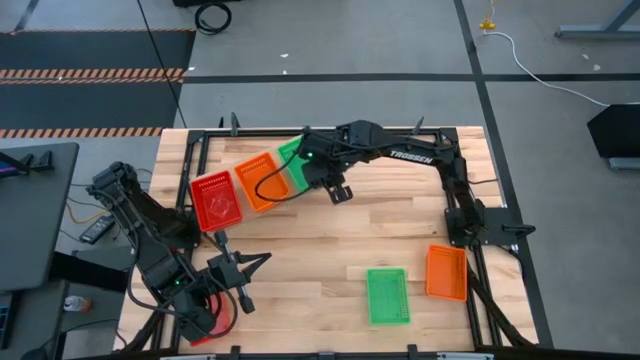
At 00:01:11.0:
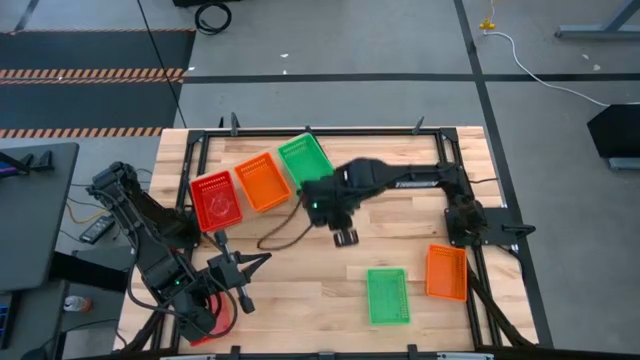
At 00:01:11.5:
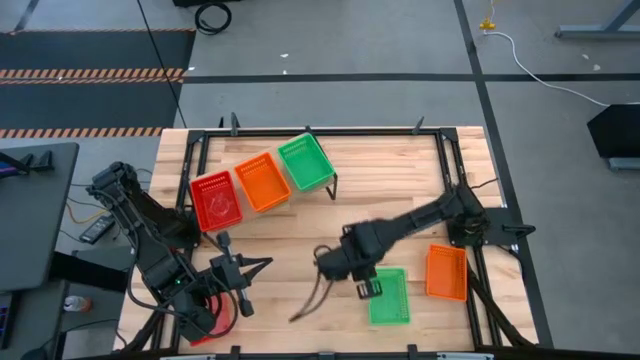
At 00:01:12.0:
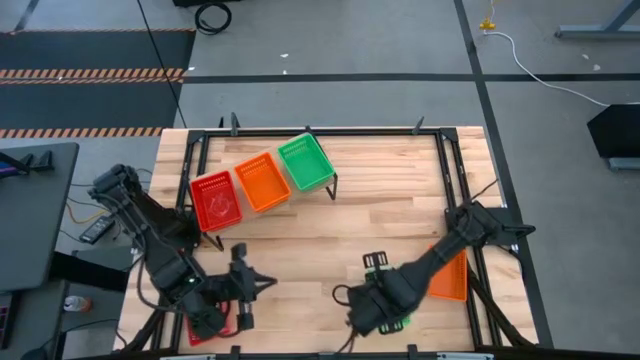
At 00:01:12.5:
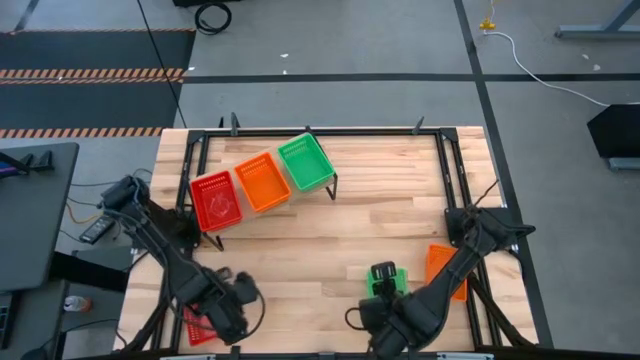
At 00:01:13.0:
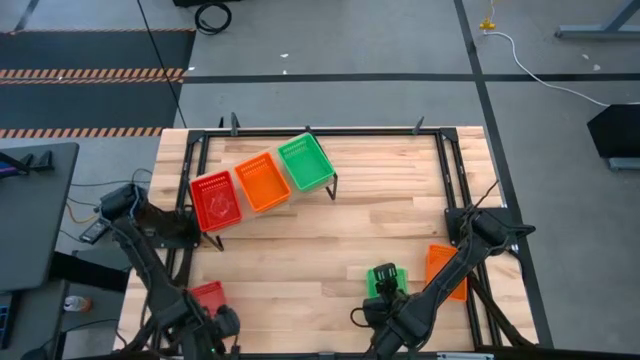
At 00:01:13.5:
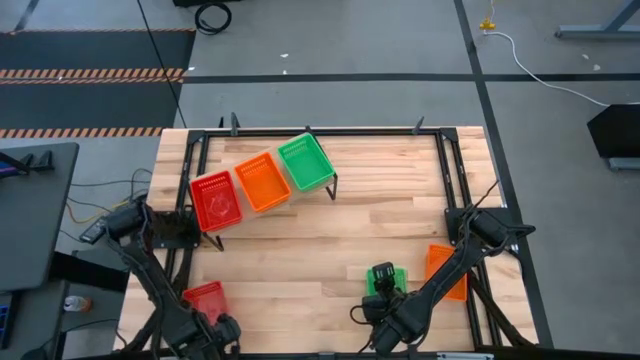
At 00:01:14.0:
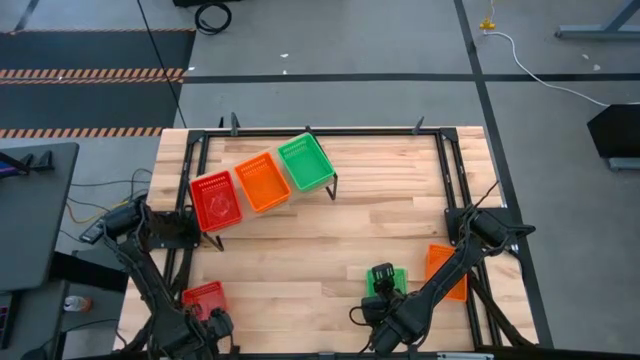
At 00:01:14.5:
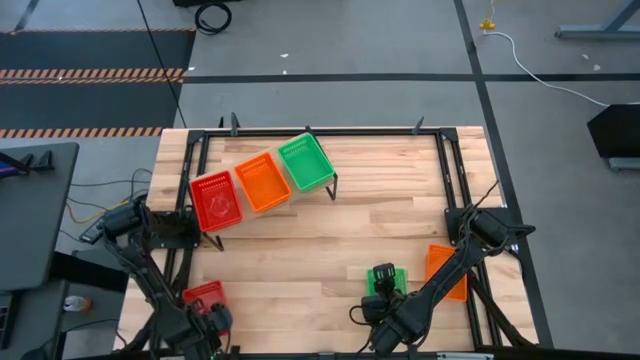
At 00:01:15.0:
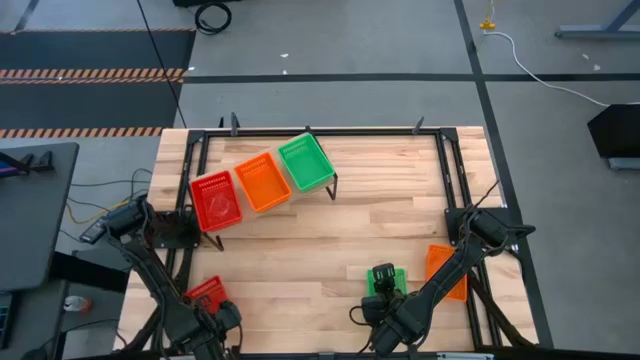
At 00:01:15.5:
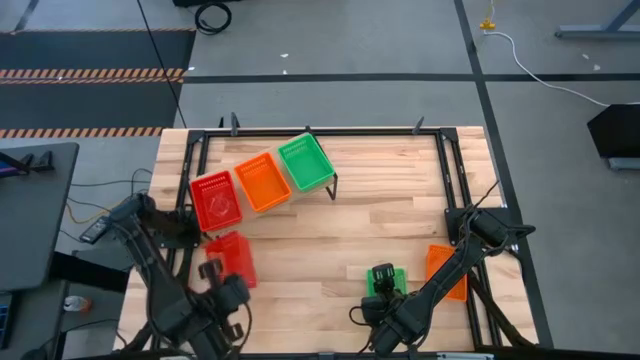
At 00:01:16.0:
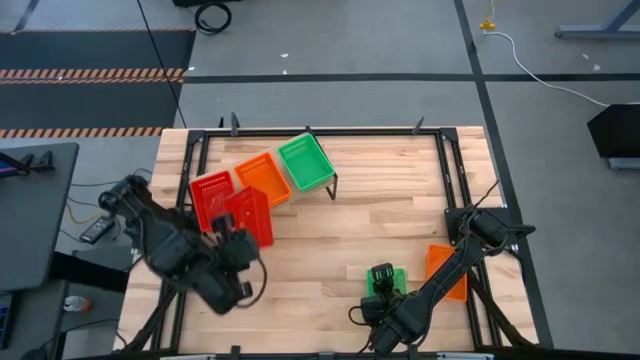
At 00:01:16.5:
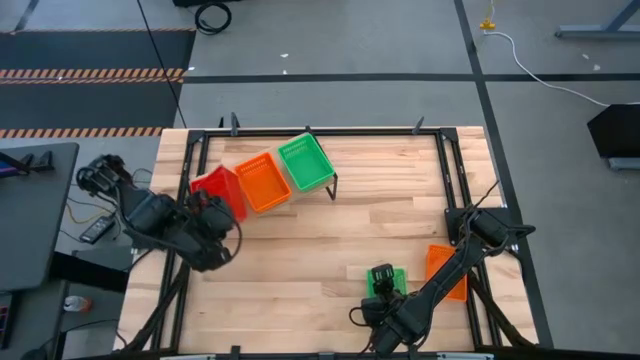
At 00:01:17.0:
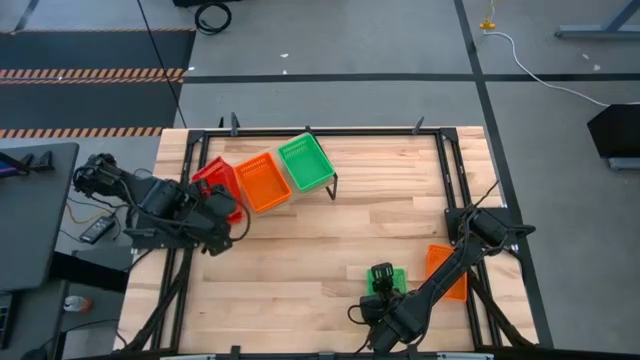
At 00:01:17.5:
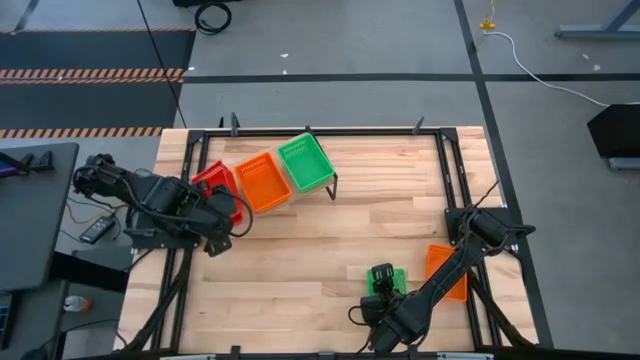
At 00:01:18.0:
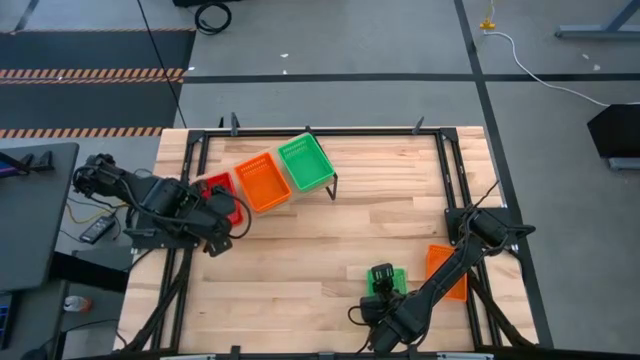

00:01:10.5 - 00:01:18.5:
Task: Stack baskets on shelf by color
Stack the red bin on the red bins on the shelf

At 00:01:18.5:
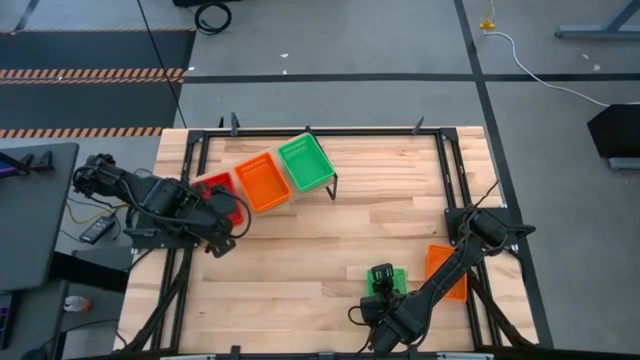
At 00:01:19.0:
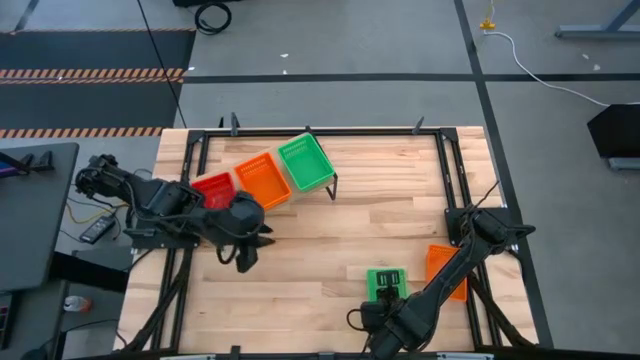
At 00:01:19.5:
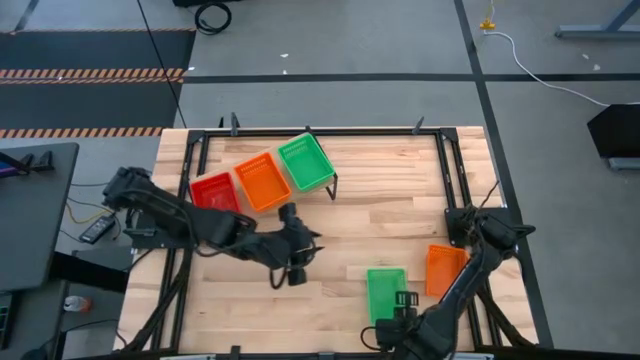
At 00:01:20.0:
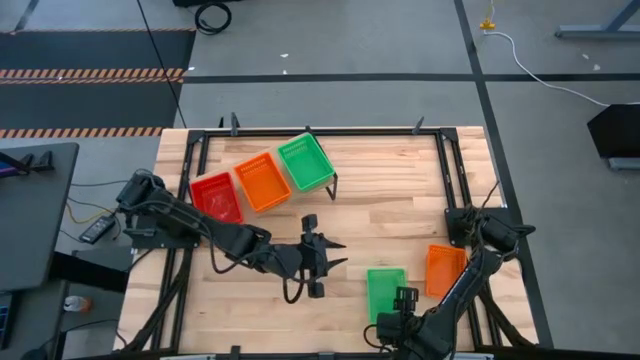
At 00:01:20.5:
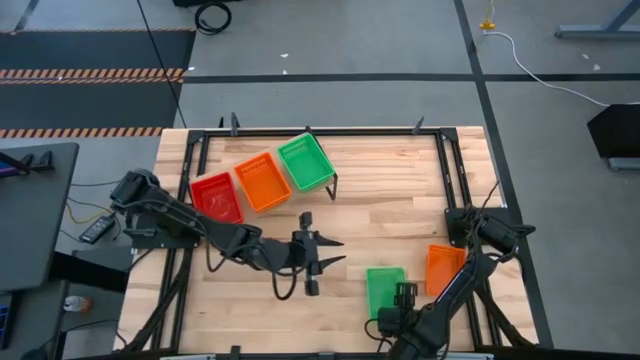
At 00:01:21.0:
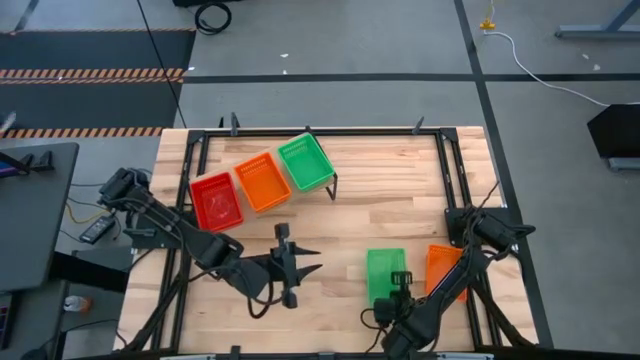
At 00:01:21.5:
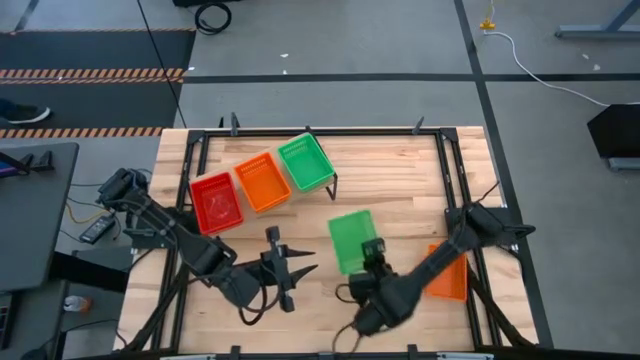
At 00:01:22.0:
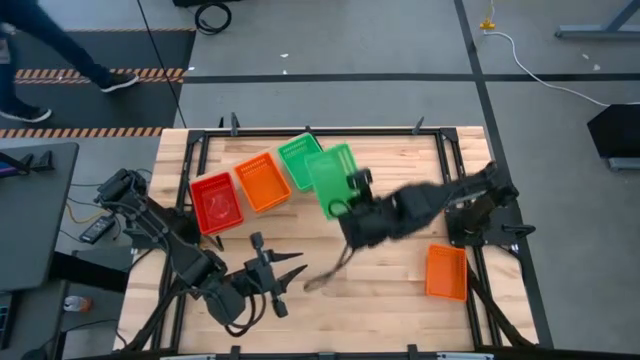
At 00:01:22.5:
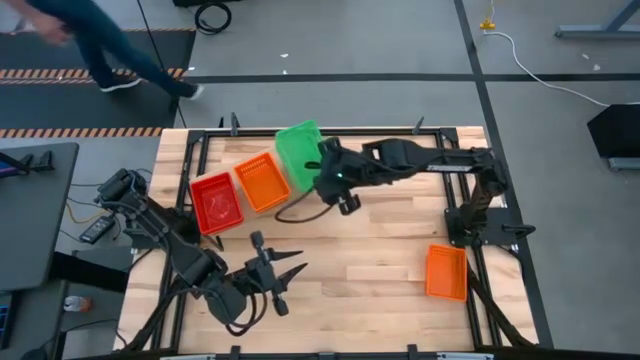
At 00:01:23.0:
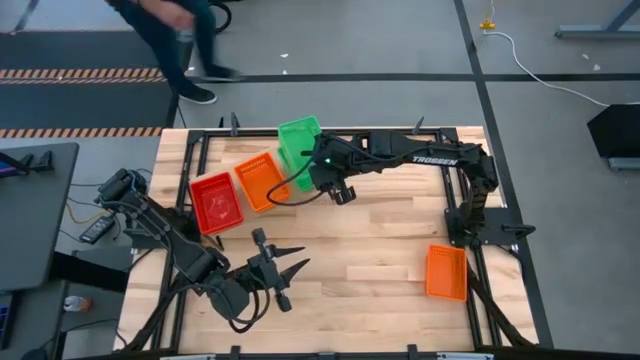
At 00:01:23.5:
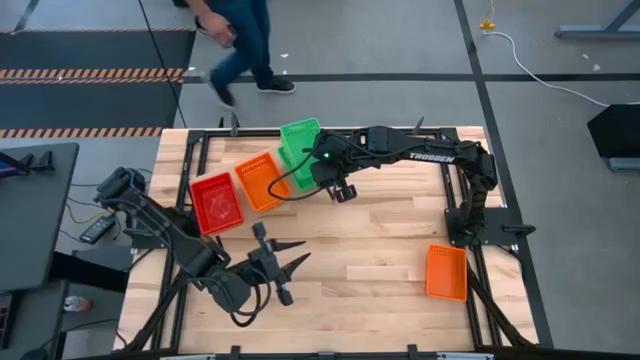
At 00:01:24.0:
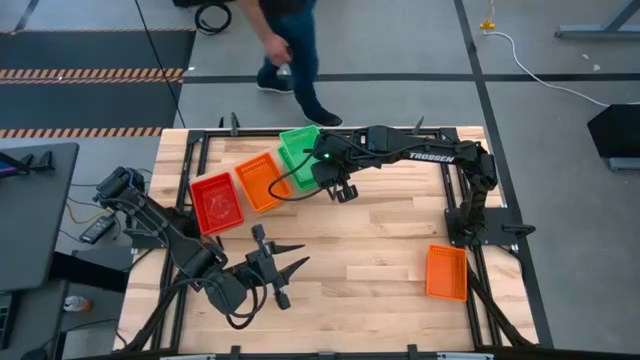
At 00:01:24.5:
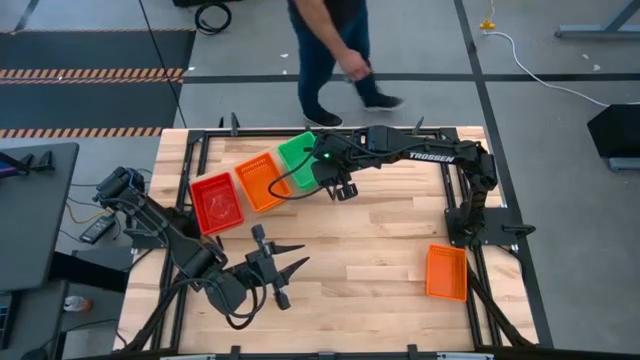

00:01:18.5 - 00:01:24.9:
Stack the green bin on the green bins on the shelf

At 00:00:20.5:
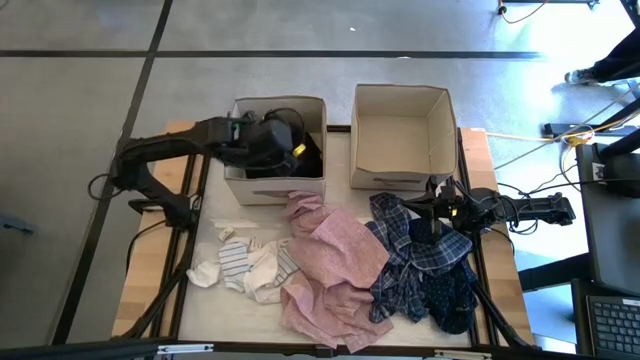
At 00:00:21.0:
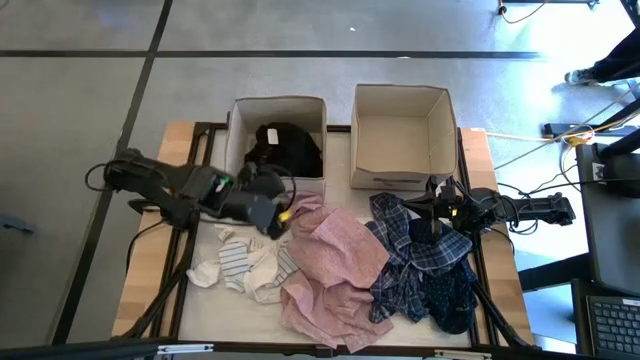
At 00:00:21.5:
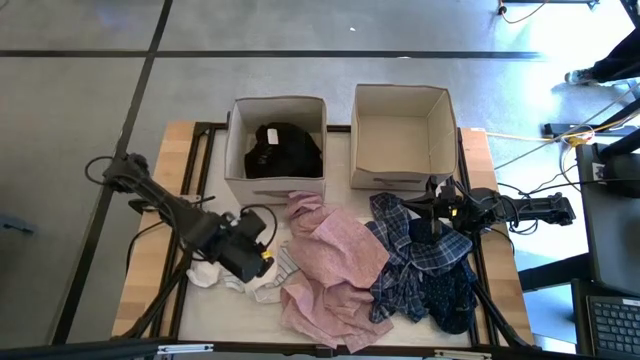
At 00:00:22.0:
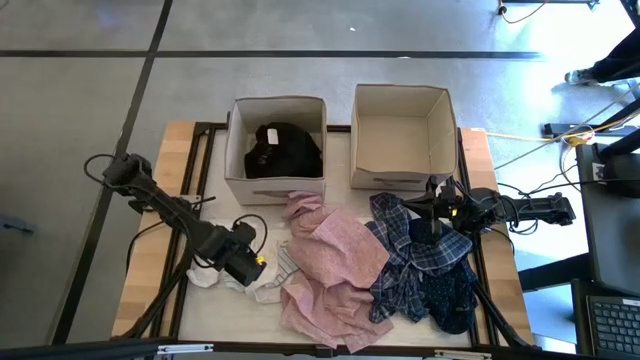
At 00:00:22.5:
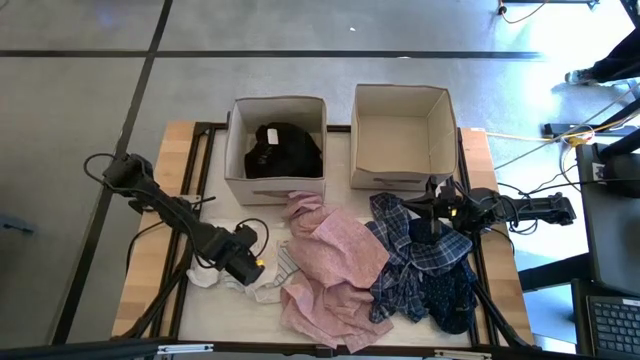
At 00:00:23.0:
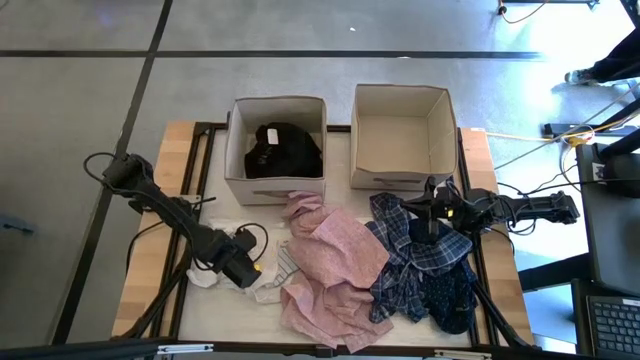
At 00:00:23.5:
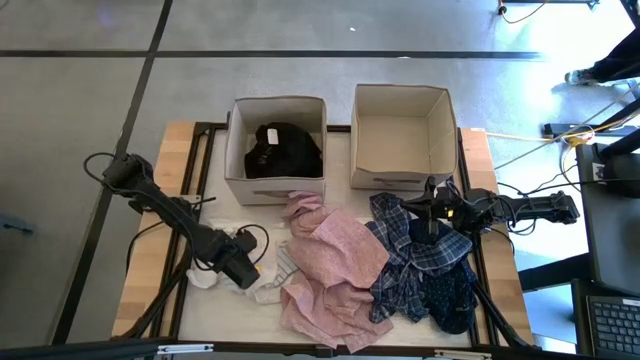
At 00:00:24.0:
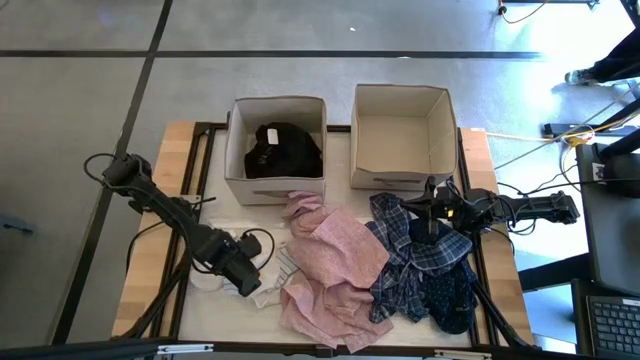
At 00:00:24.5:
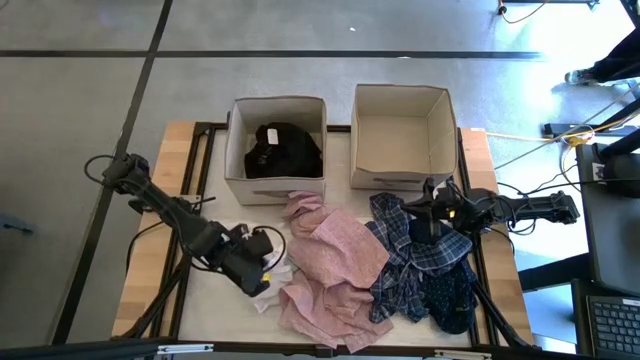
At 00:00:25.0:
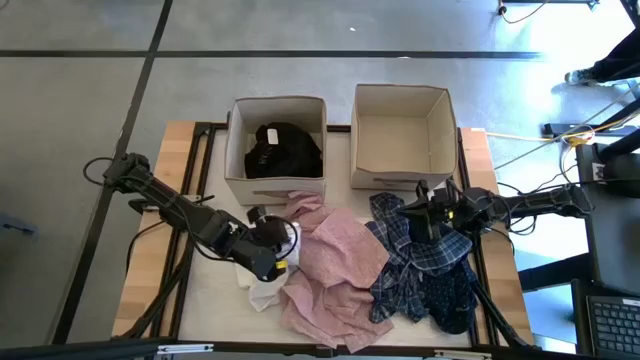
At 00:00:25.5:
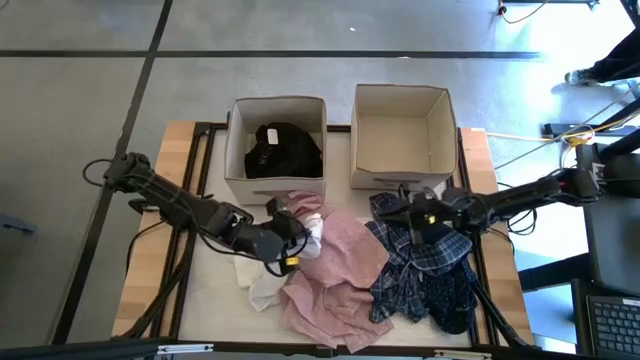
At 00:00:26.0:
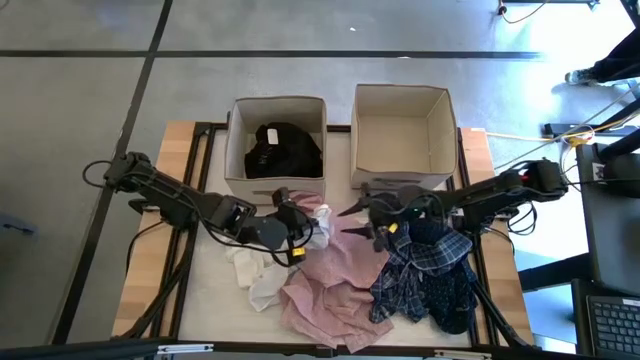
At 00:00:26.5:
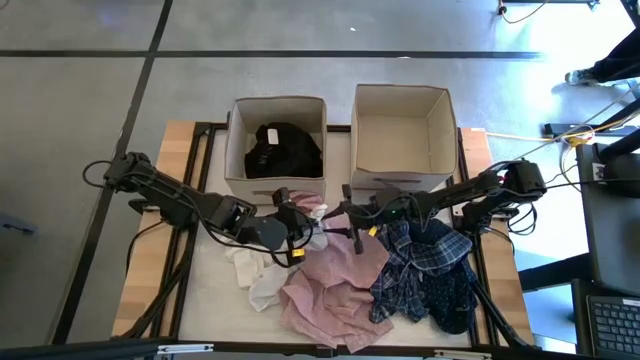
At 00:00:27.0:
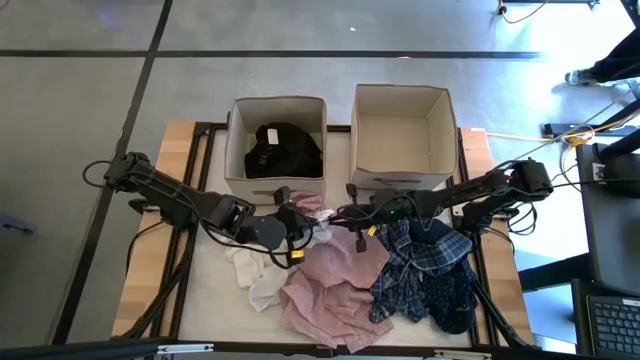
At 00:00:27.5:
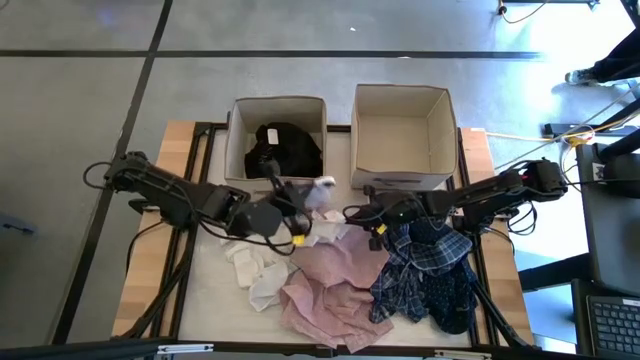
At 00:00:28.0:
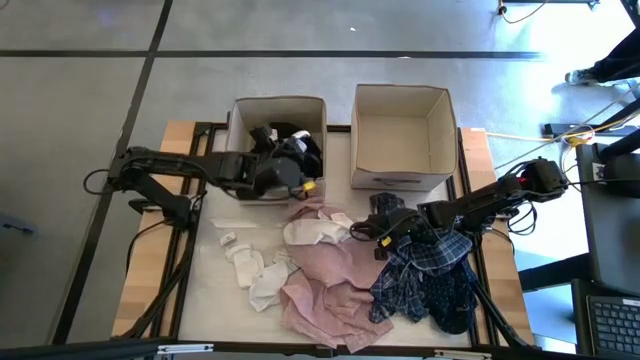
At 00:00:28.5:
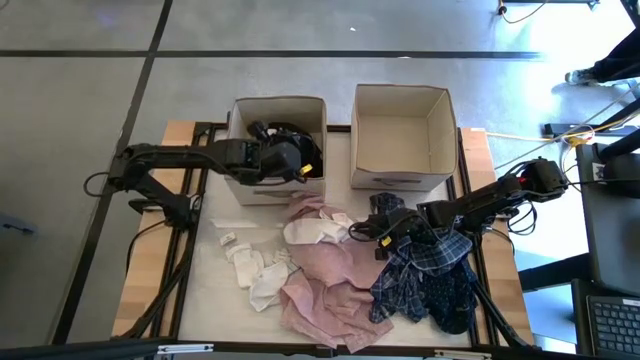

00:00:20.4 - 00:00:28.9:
Task: Sort clothes
Put the left white striped sock into the left laundry organizer
